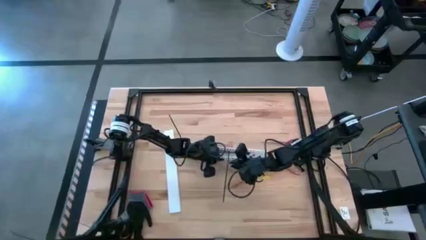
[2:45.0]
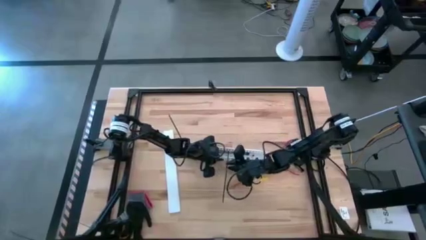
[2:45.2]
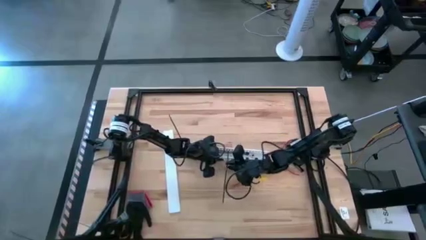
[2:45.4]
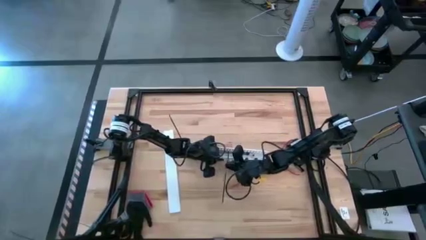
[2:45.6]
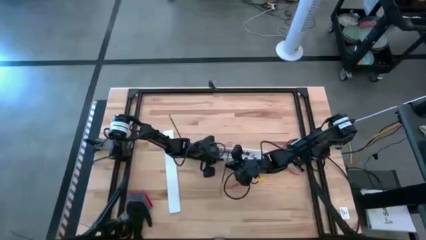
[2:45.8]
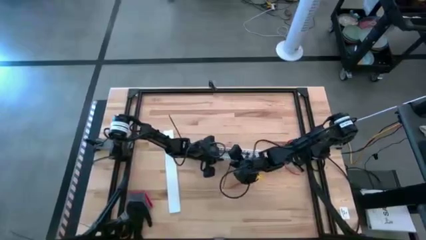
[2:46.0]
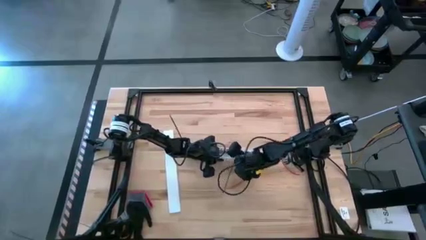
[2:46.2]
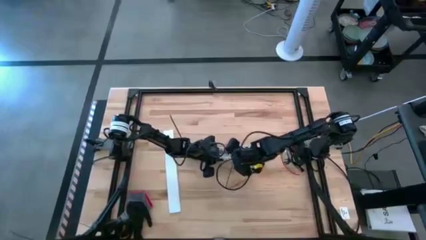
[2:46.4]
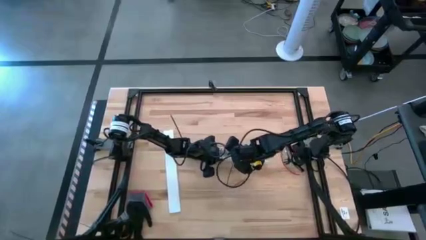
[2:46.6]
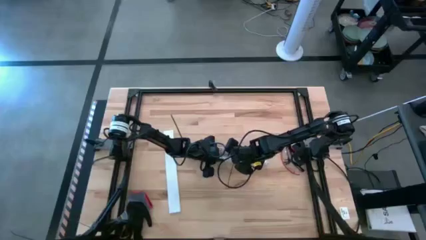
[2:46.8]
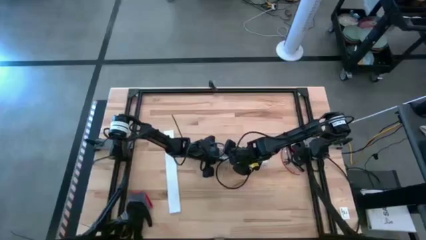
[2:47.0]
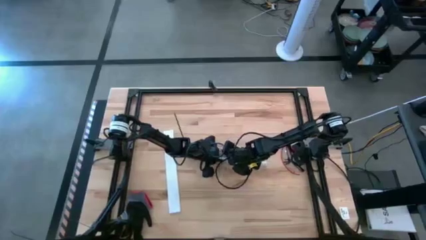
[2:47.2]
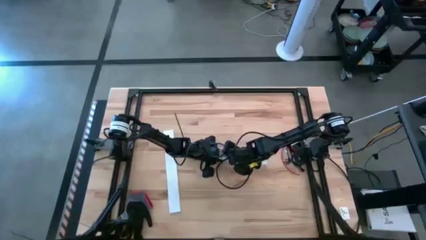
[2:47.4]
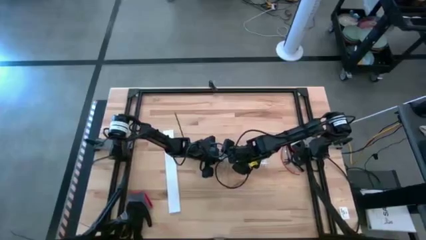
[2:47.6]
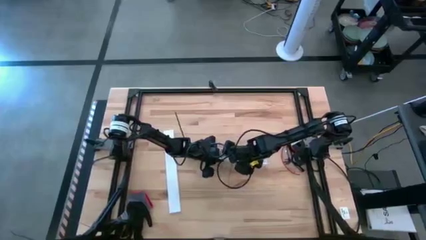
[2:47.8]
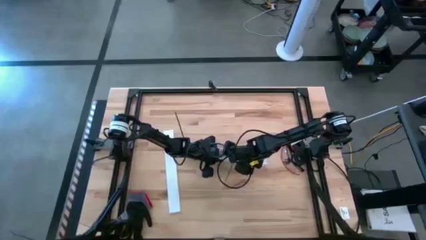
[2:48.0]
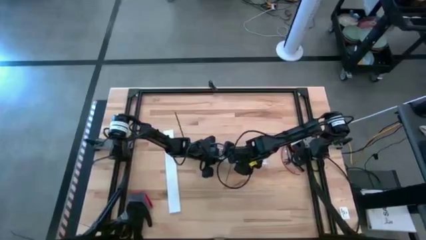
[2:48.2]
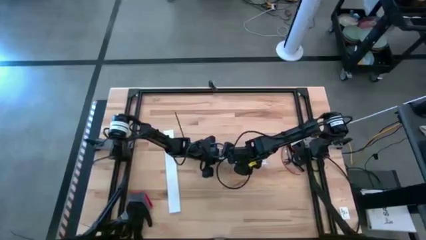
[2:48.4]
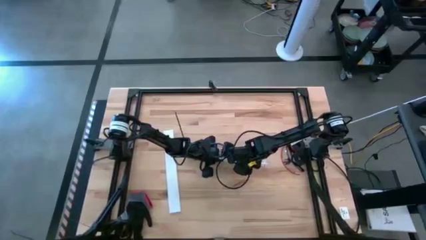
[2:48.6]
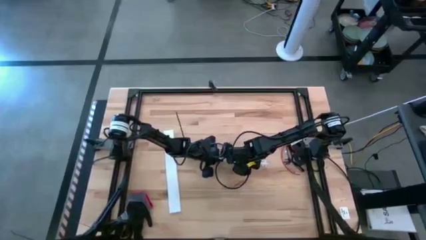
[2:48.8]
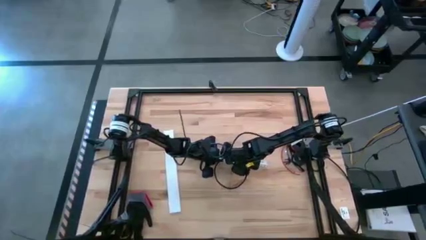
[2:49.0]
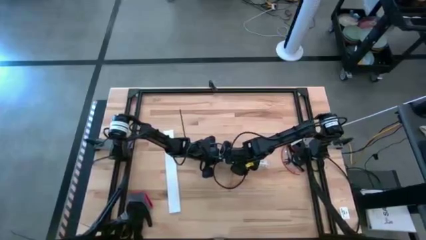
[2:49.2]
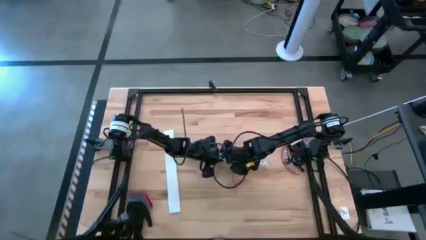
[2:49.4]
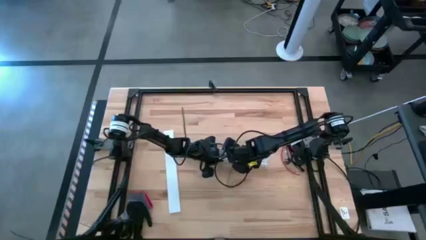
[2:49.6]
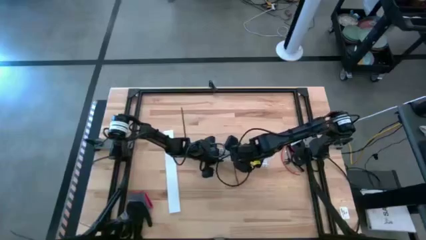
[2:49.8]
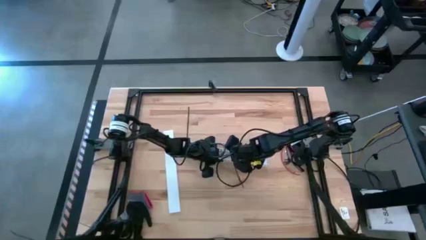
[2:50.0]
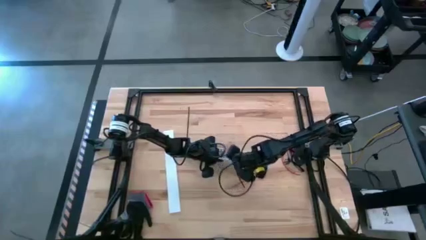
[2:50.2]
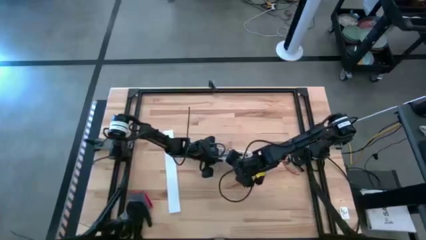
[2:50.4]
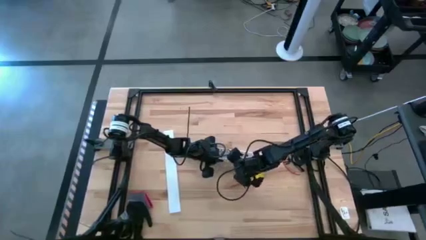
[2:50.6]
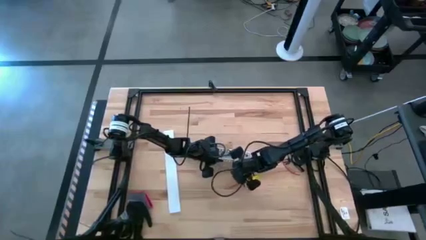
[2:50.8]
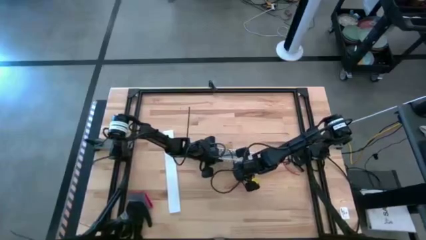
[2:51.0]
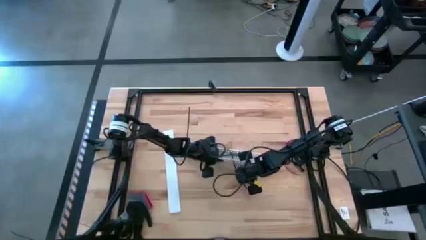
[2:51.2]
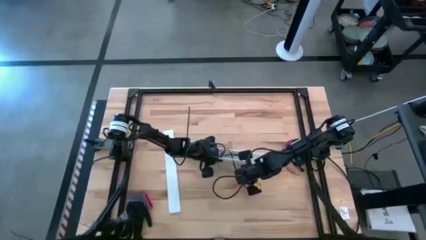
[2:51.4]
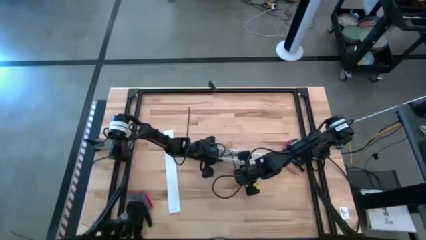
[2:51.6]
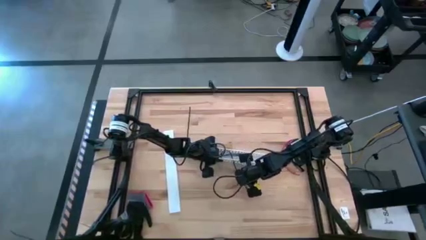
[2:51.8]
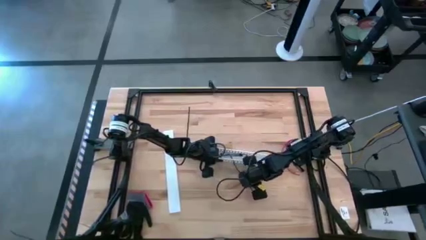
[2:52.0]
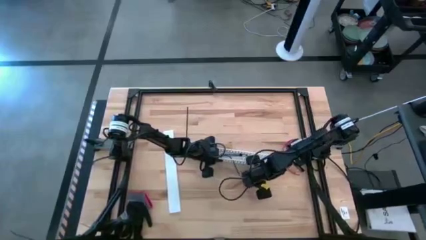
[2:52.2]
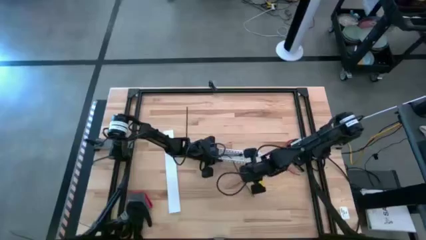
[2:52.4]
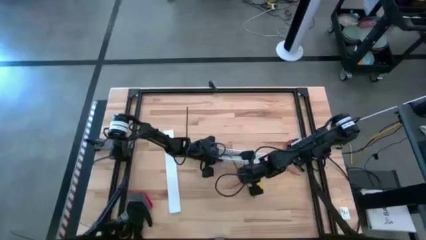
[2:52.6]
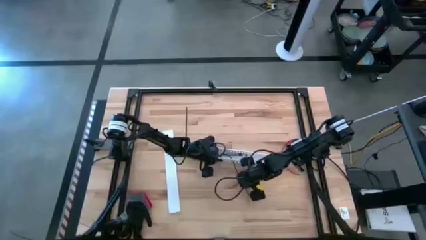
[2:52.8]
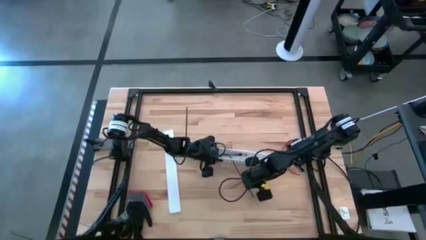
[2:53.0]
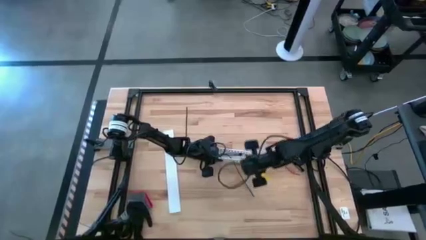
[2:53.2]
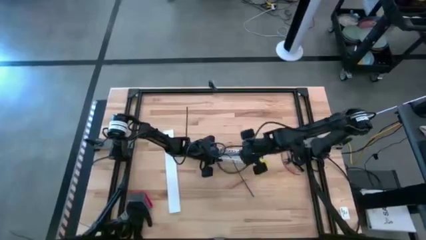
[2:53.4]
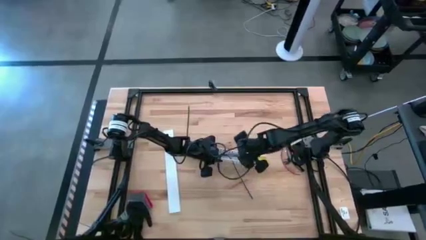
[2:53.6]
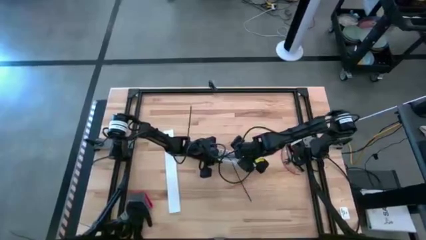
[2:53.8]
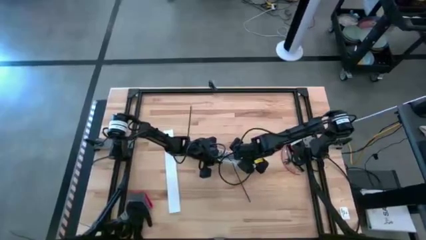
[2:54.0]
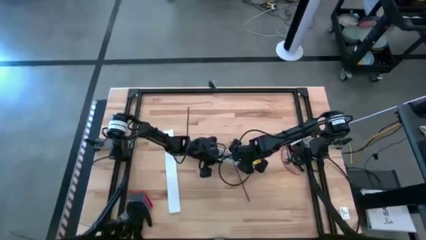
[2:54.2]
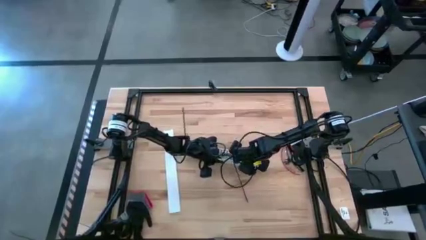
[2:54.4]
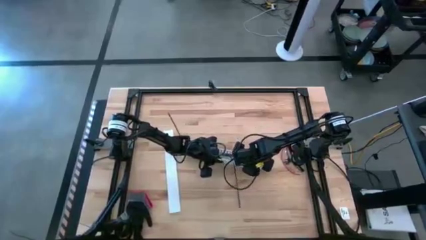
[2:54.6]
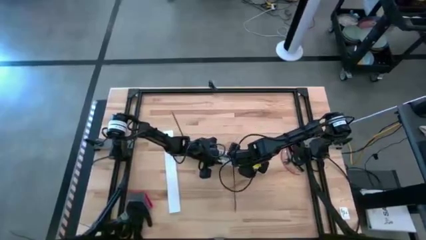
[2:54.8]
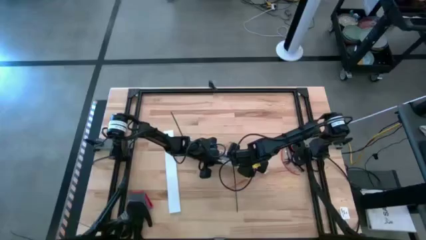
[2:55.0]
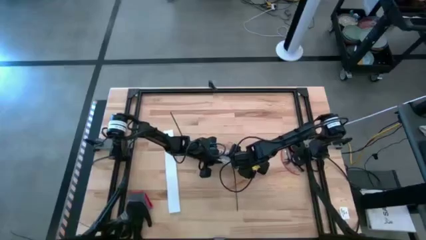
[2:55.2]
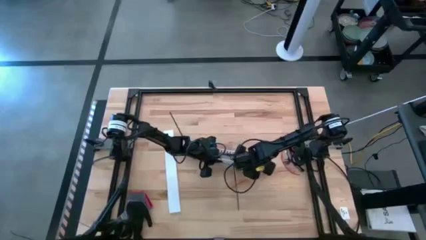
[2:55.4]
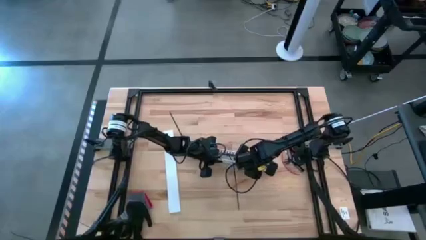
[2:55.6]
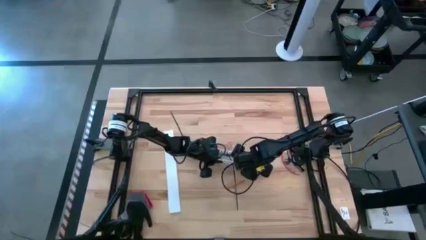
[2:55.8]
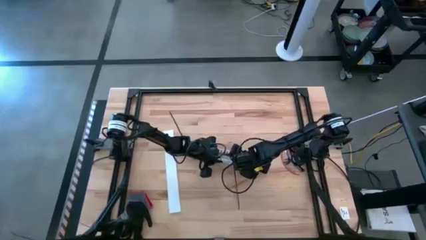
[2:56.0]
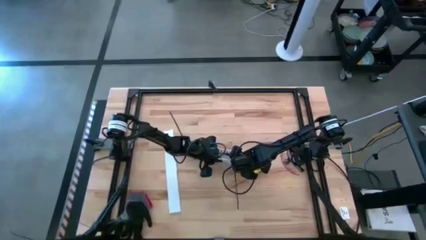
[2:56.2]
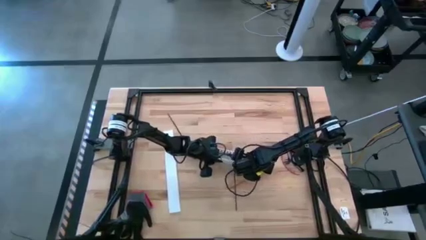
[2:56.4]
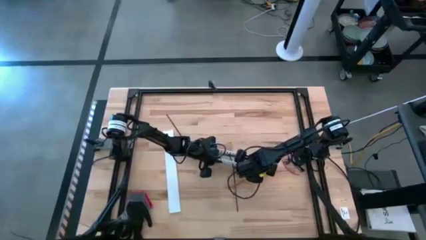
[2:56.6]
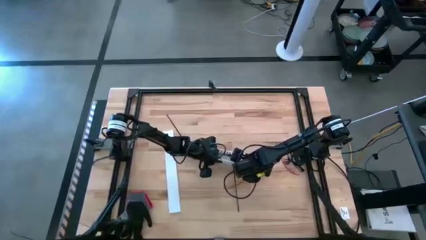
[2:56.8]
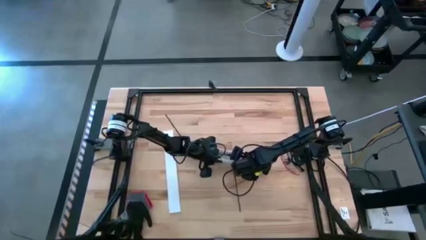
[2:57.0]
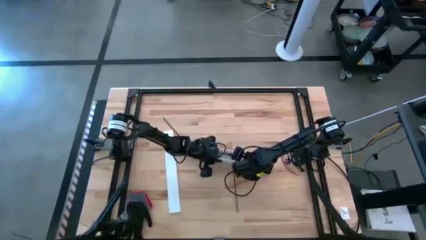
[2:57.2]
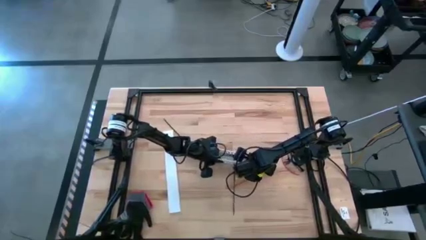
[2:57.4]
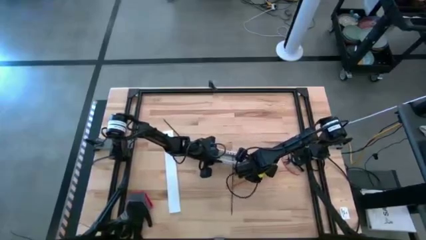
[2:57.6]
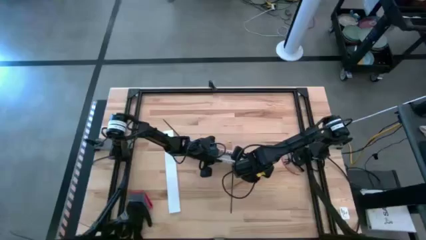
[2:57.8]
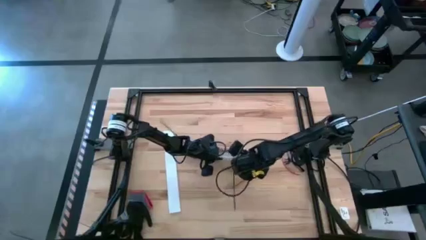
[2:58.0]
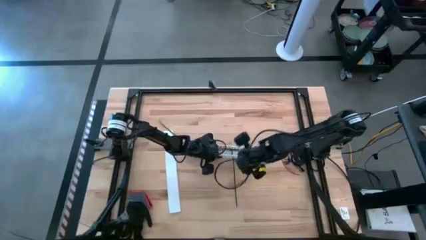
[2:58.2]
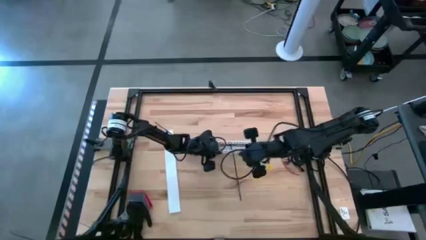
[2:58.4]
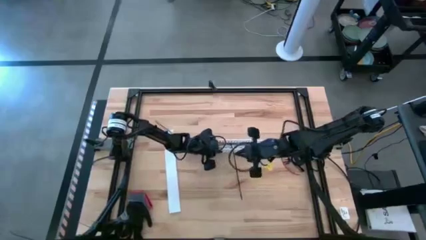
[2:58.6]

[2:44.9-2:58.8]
Task: Ziptie cables
Put the ziptied cable wires into the white cable duct

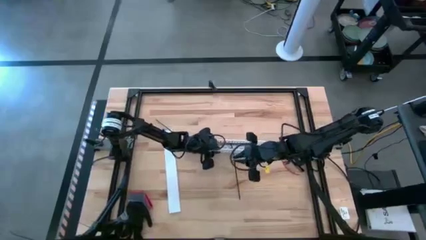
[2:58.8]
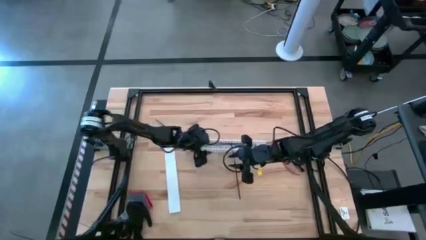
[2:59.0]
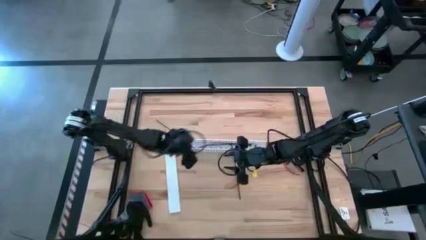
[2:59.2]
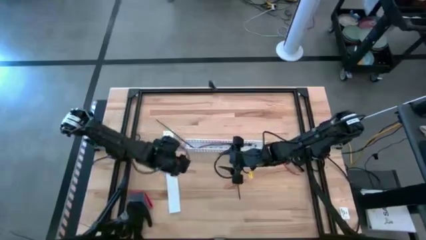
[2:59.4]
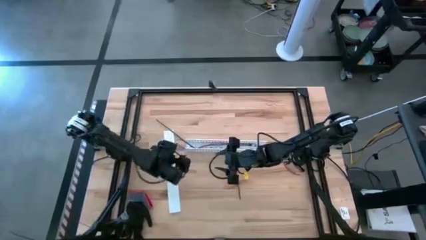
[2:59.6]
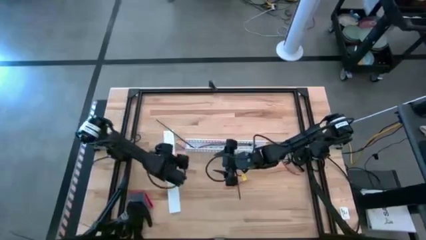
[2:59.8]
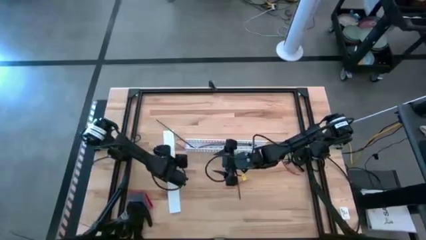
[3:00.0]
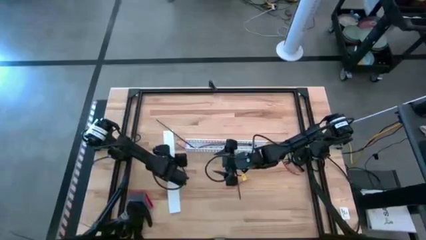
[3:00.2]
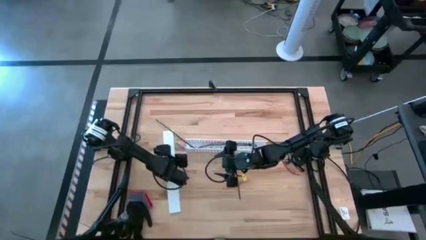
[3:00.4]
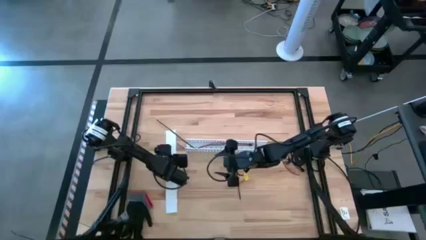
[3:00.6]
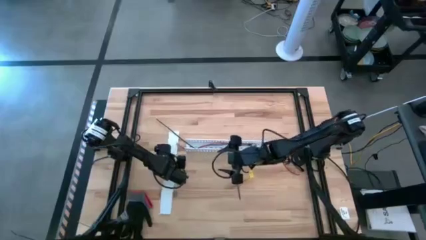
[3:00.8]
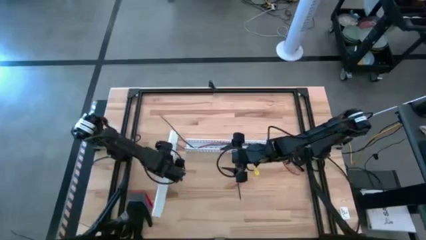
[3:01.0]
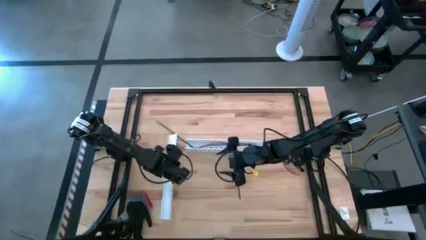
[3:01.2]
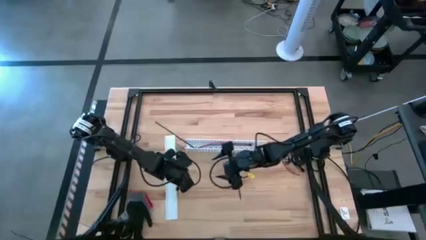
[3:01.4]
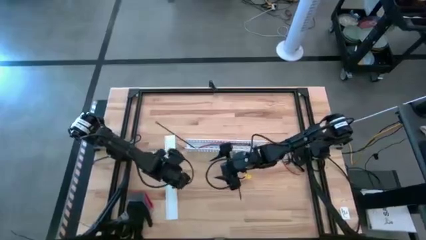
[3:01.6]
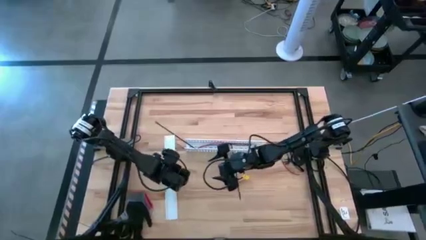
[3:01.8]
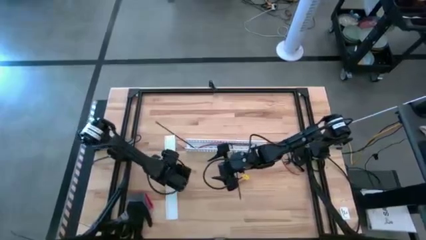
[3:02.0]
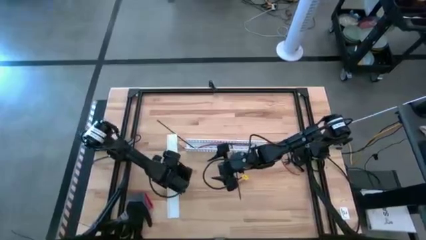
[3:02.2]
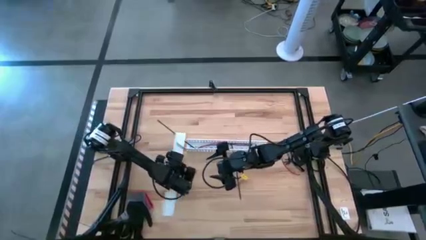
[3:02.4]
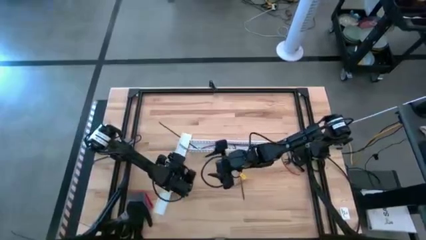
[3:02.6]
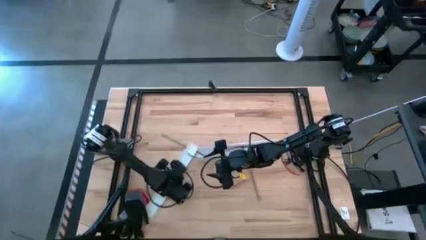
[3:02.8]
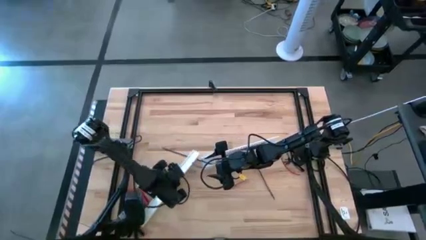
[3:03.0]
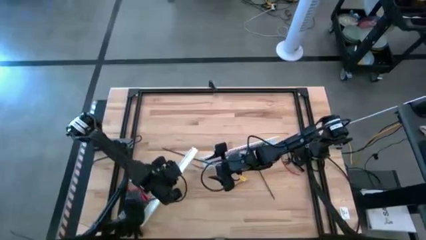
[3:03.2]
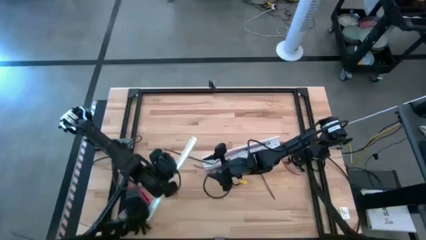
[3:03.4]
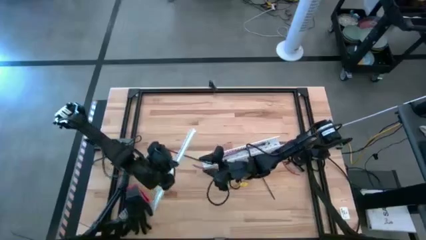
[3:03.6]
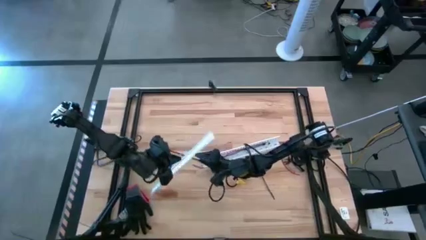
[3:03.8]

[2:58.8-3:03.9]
Close the white cable duct
